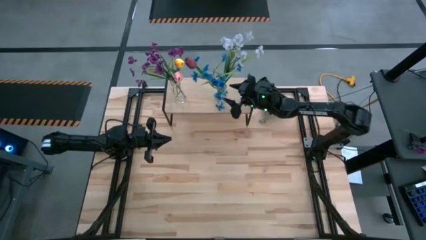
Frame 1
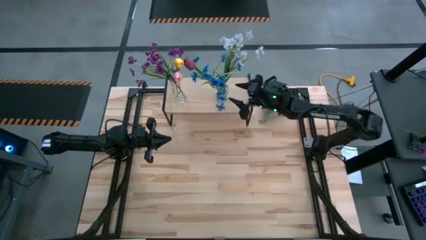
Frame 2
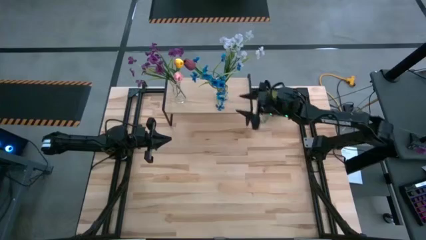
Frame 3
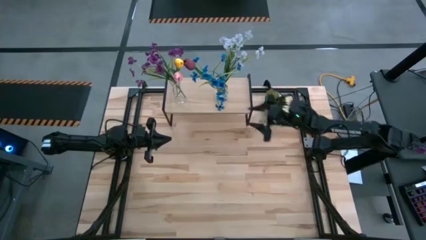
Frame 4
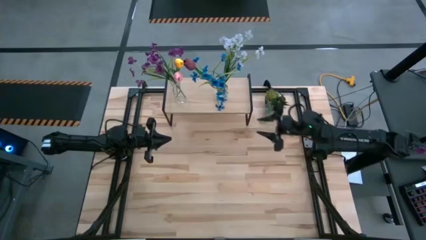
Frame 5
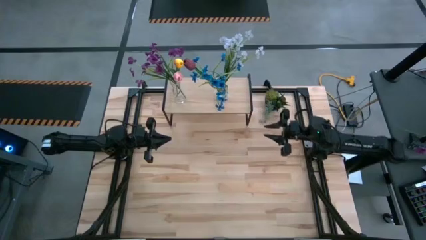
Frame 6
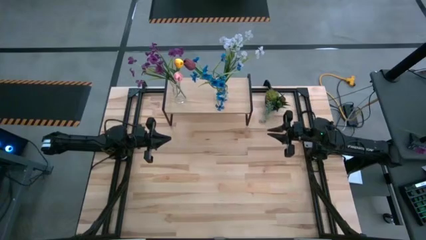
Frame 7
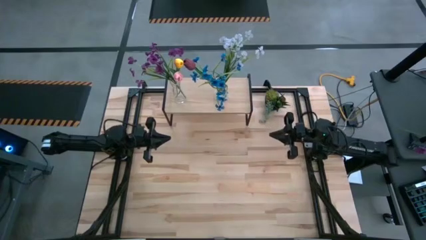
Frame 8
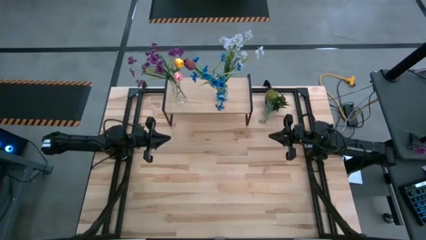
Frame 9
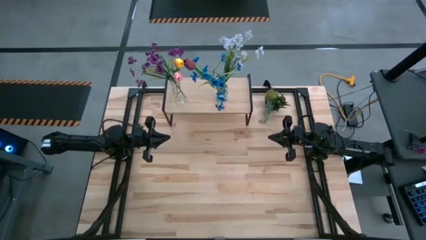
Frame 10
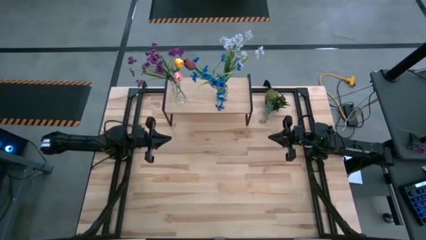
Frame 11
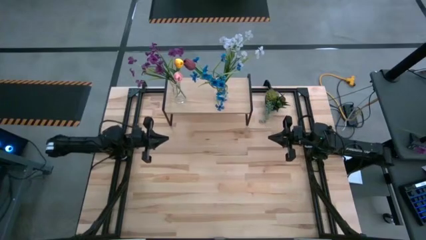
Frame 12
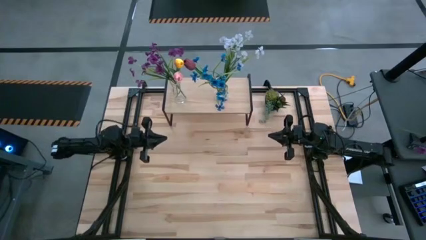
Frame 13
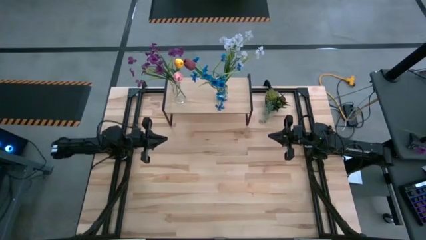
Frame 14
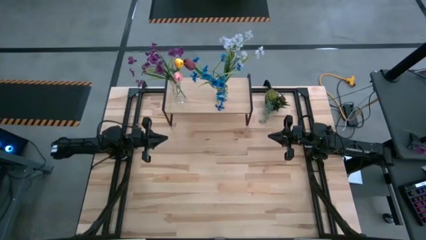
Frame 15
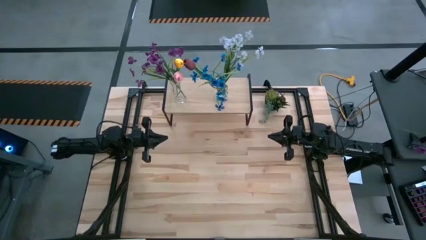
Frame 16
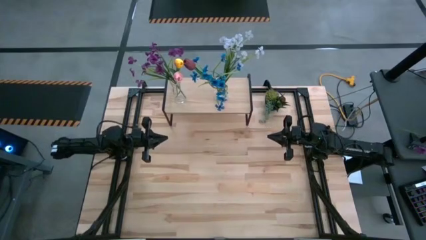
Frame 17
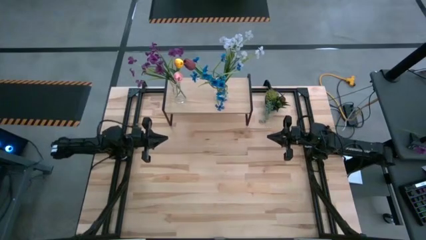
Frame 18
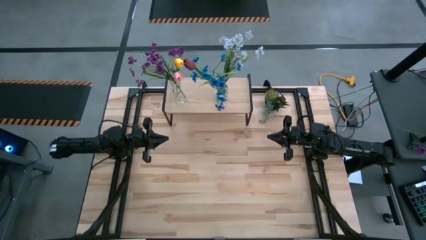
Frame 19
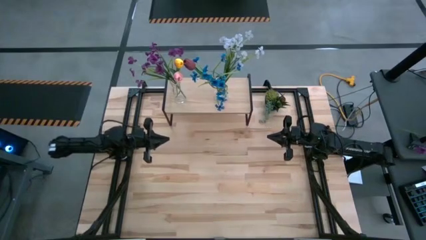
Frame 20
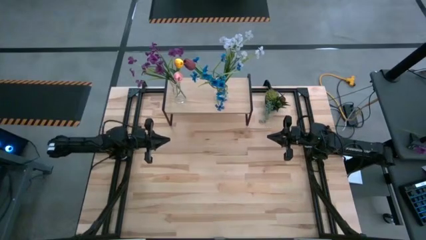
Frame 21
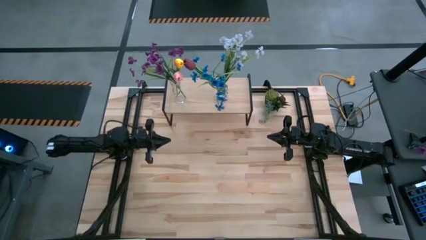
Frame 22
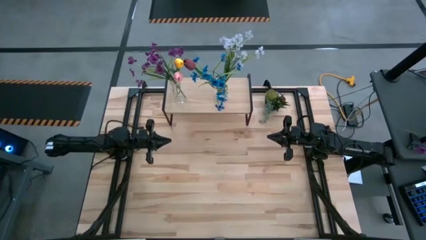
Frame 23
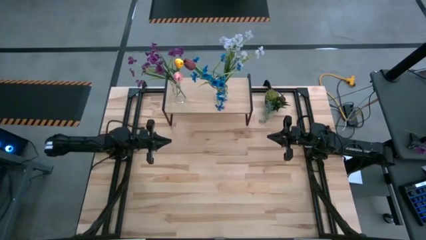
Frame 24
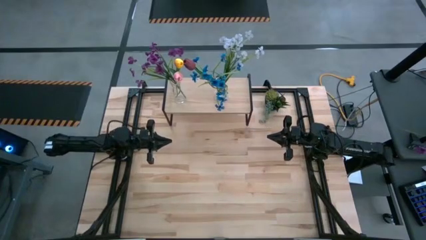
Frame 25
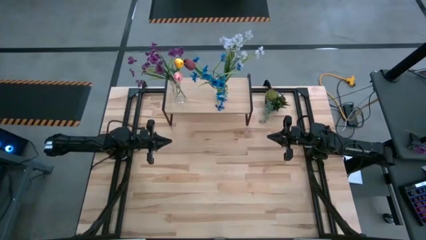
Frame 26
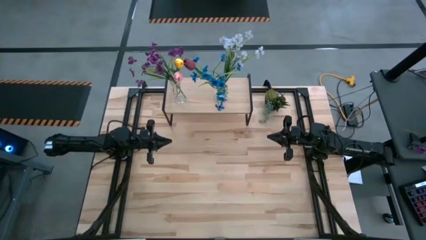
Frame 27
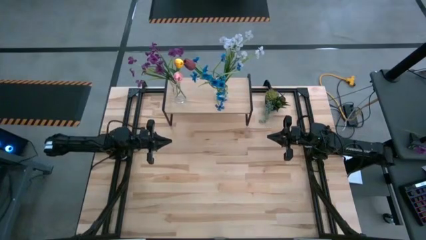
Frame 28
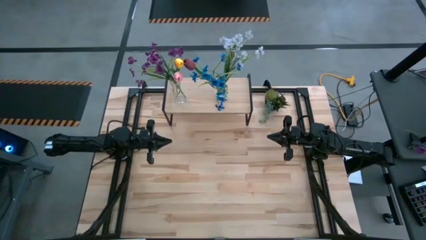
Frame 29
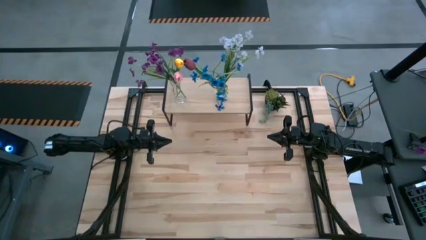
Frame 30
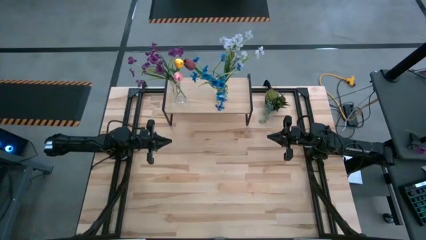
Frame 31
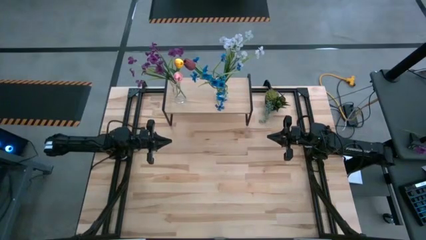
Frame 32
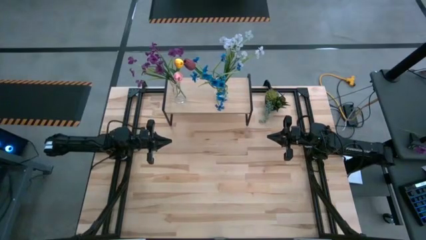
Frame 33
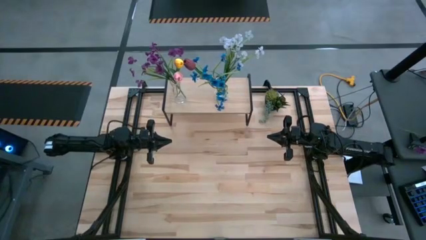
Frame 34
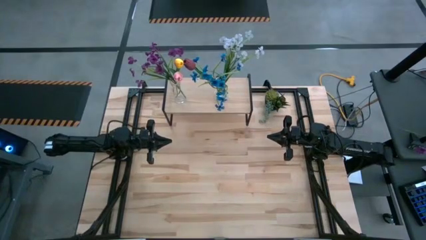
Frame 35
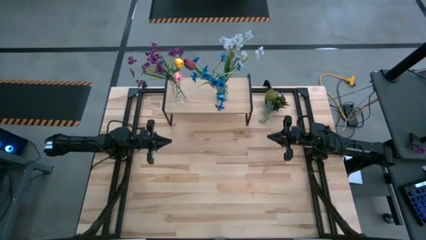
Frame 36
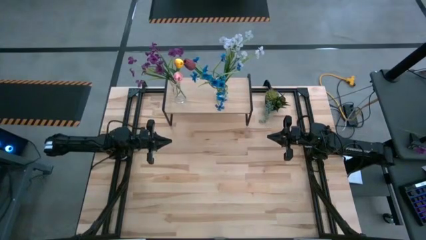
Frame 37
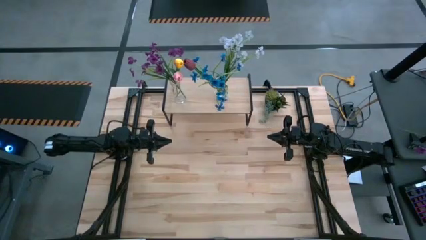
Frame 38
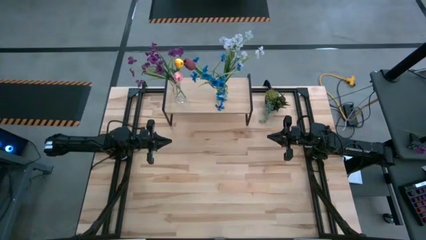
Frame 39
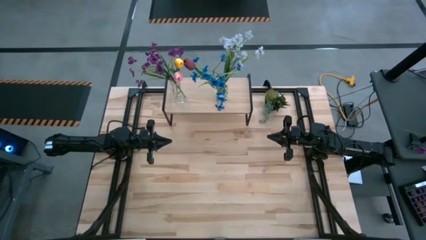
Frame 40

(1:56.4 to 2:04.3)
Task: Pick and place flowers into a vace then onto a shelf
Return to Home Position

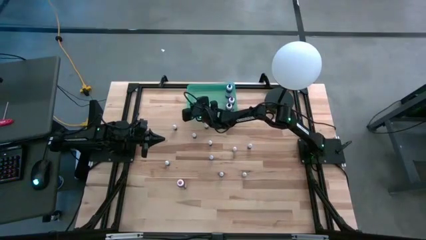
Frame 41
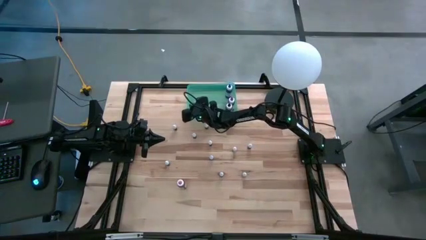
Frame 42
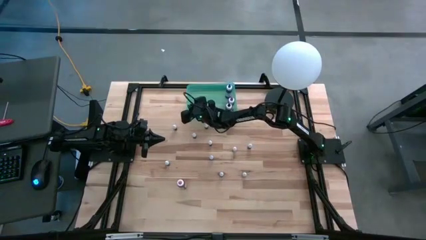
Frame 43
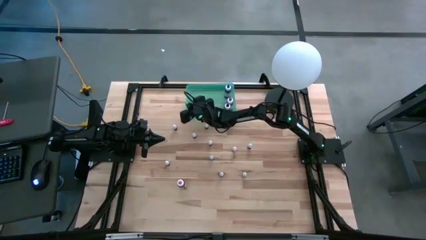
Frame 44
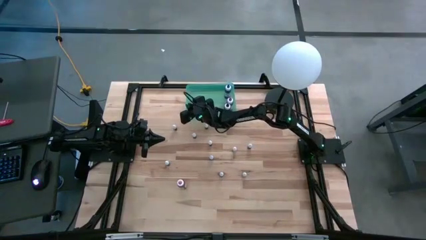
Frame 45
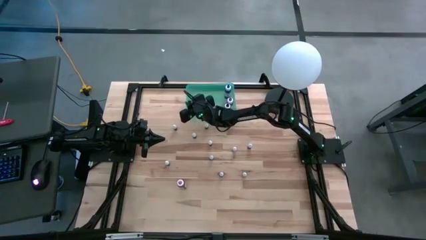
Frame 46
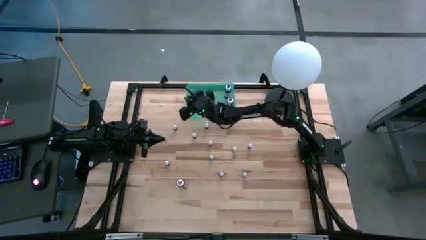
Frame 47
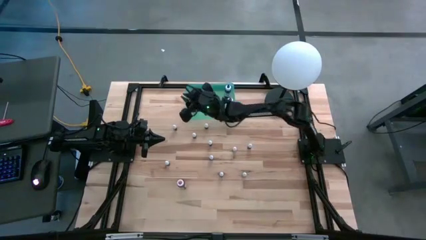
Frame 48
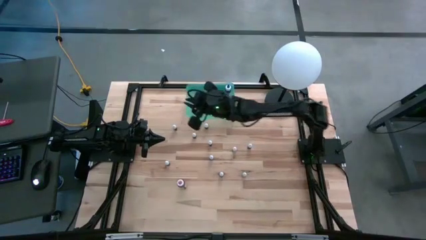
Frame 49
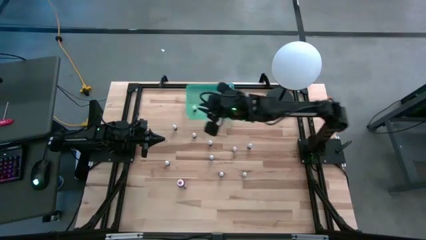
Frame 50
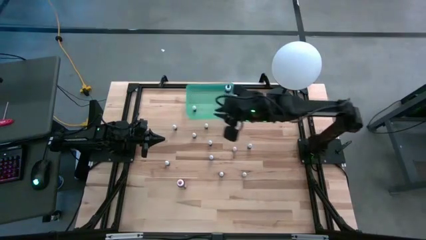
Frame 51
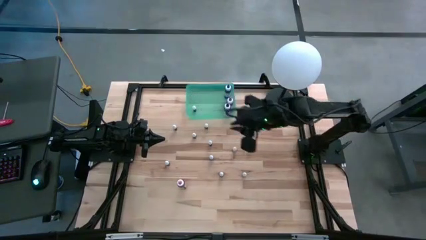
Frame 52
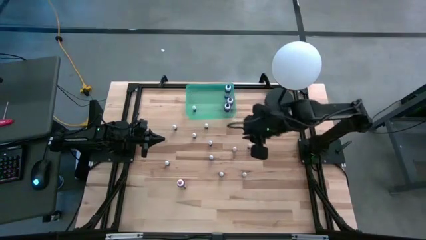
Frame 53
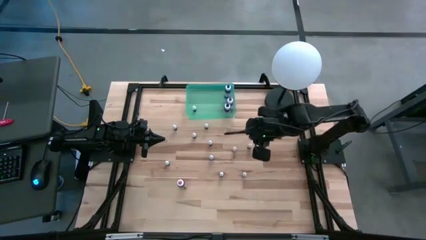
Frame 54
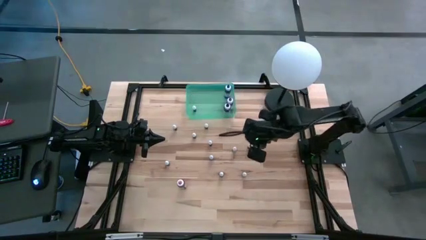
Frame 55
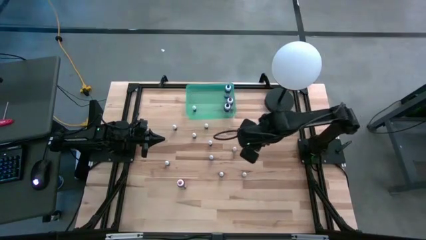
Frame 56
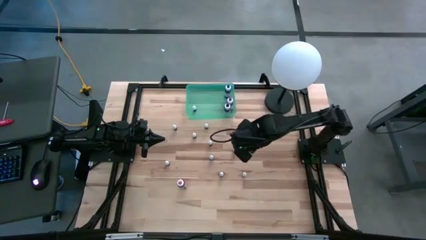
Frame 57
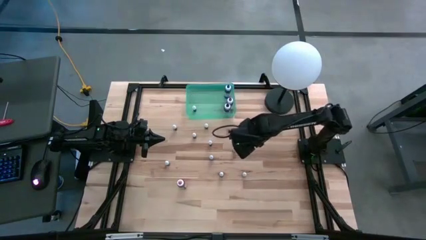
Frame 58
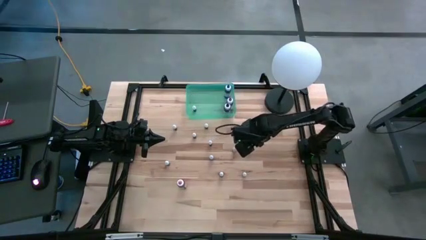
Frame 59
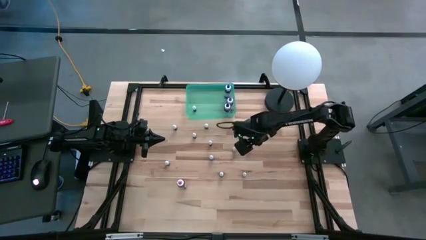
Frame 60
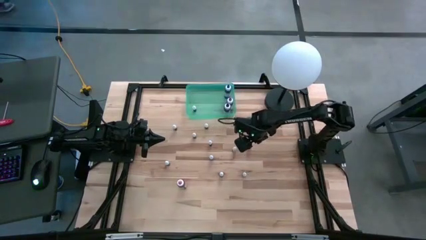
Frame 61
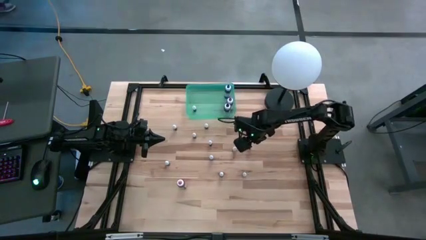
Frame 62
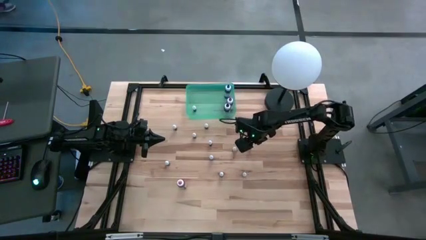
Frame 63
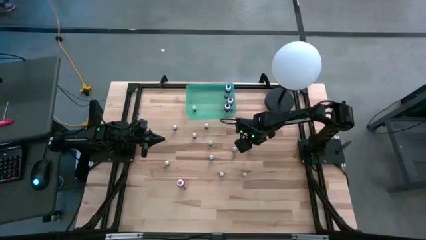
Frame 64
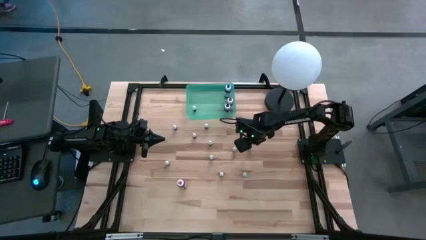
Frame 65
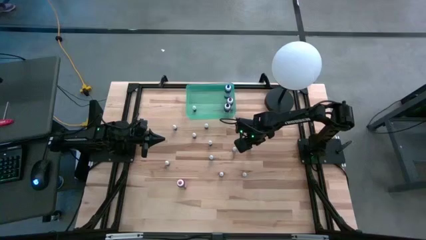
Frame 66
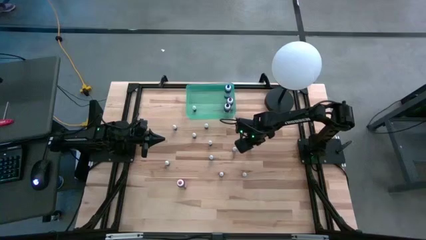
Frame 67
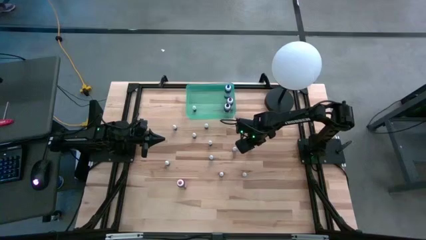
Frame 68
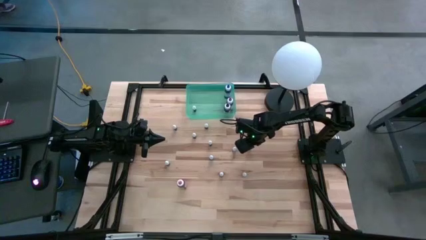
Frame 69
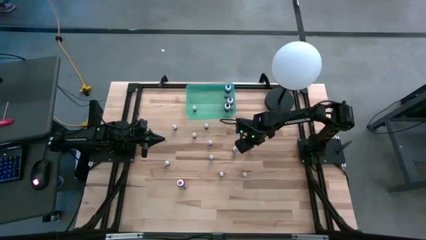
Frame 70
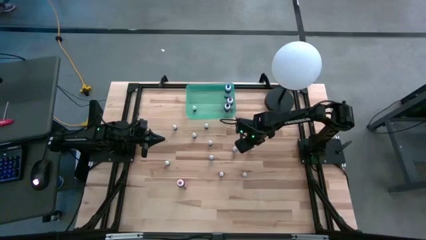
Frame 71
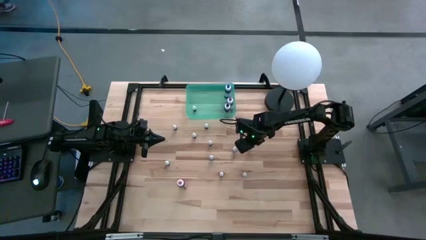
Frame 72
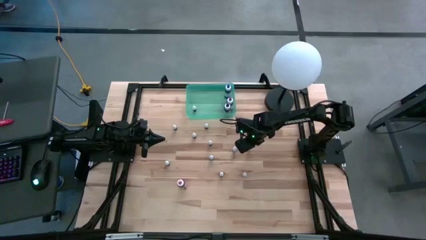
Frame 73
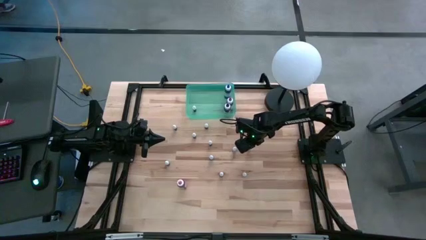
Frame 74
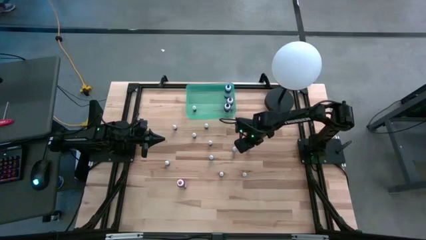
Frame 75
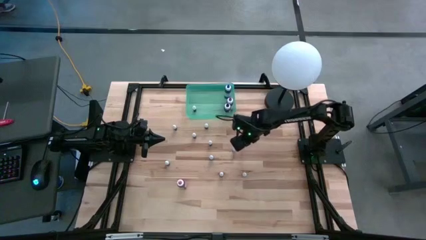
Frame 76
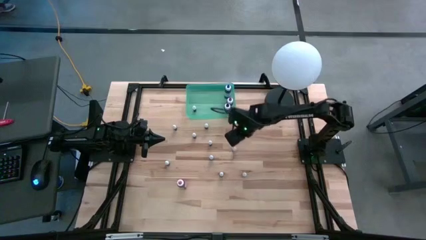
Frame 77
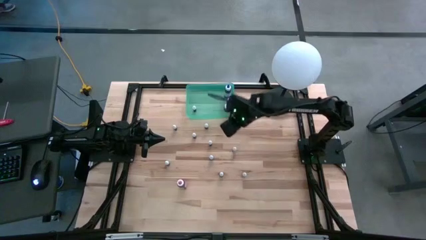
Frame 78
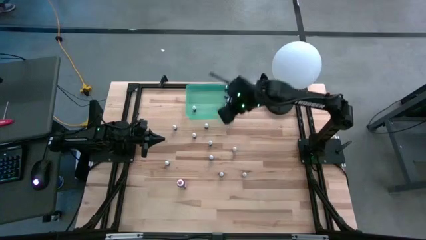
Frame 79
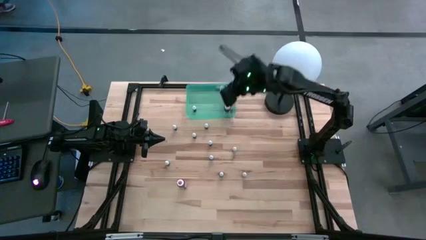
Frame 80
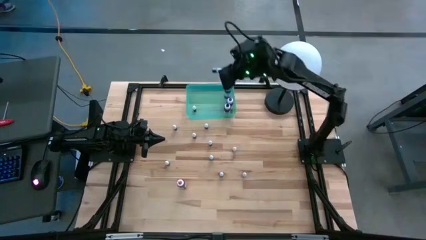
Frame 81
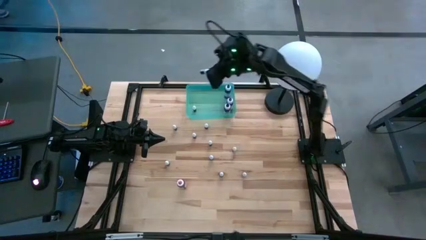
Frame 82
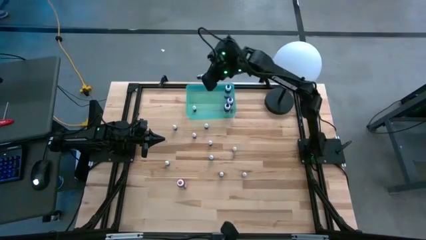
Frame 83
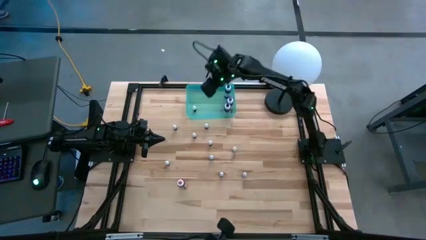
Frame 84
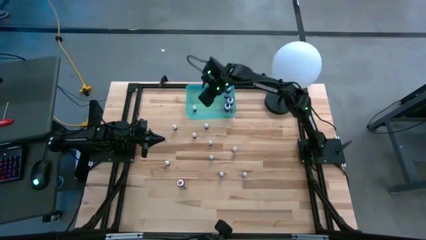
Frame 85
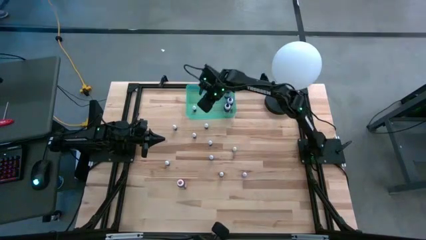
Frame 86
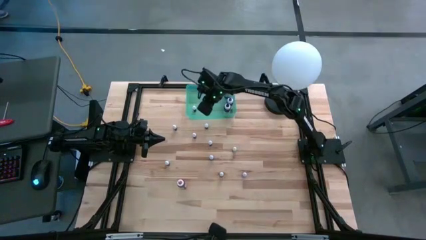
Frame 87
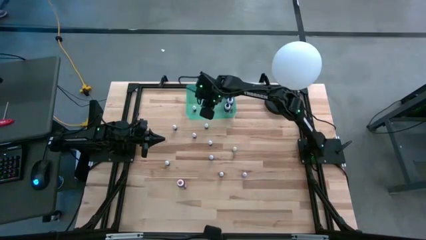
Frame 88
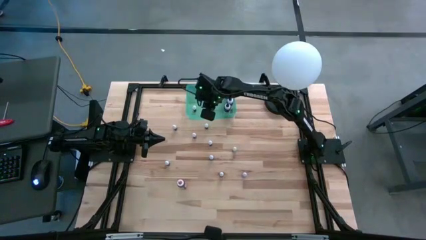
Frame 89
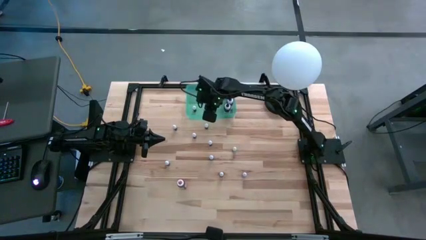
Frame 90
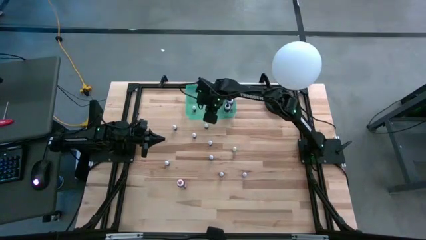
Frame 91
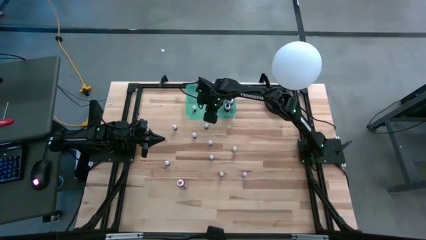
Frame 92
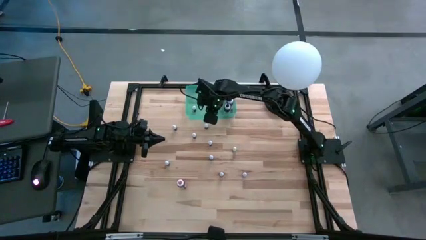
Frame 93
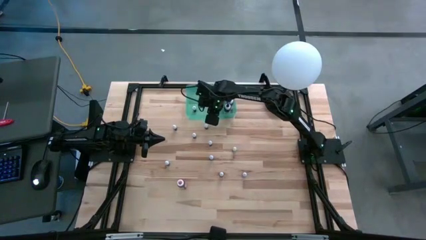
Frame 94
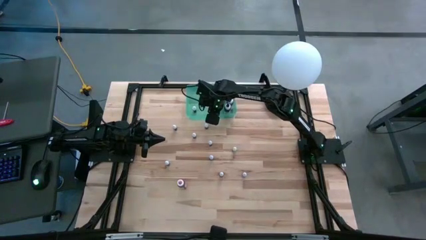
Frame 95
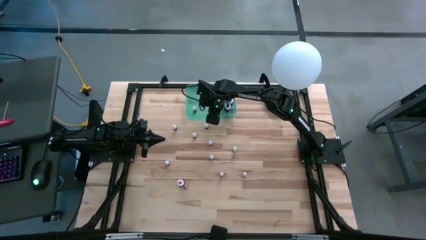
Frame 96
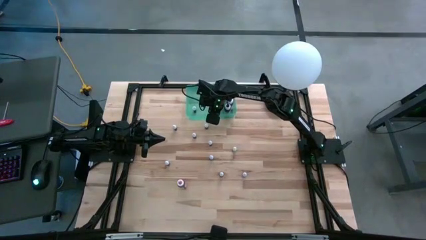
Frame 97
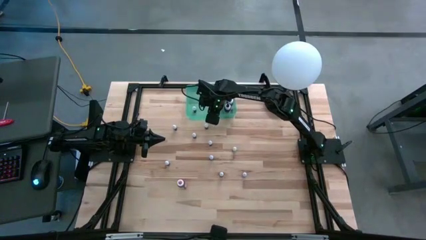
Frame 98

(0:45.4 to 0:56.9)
Task: Pick & Place food coloring
Put the small orange food coloring into the bin
